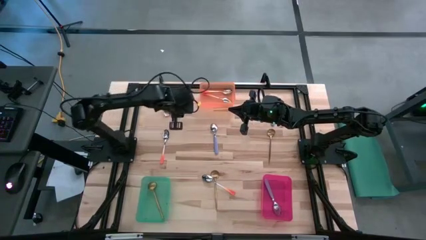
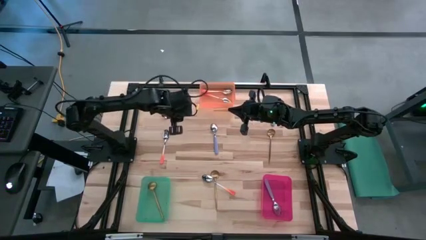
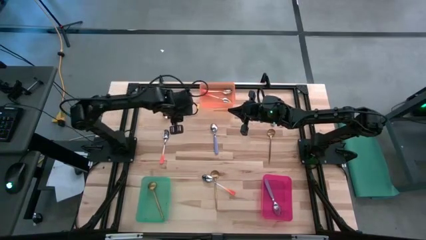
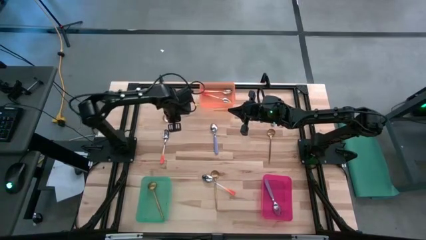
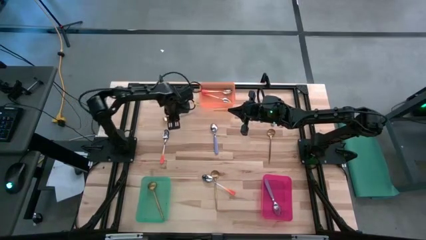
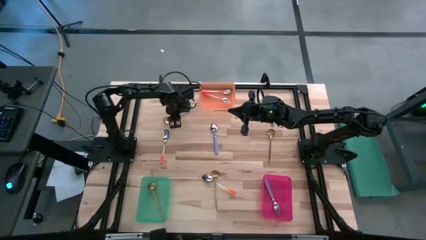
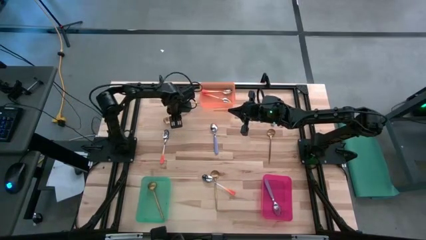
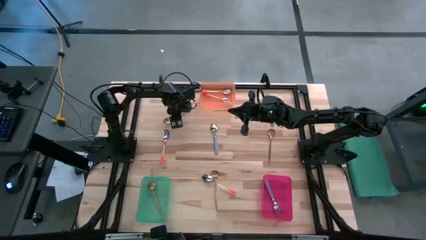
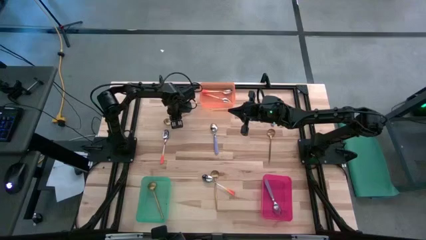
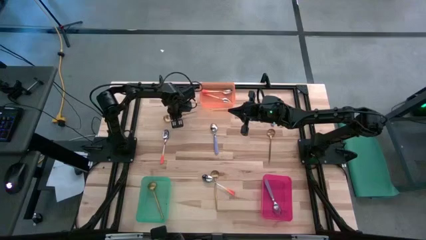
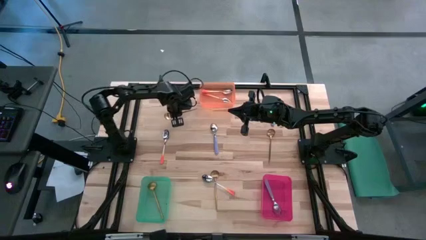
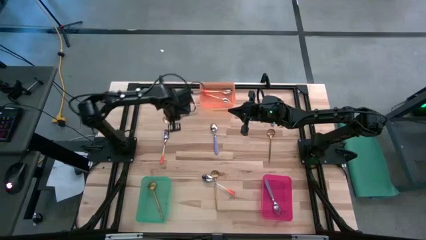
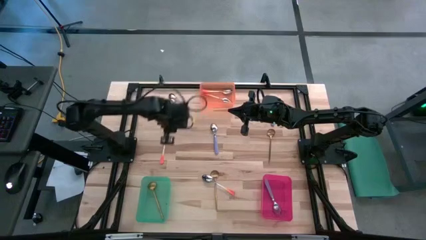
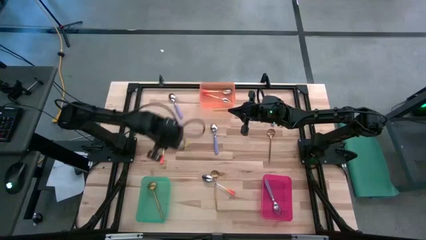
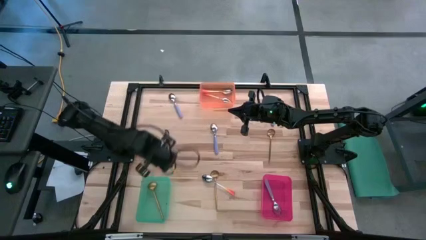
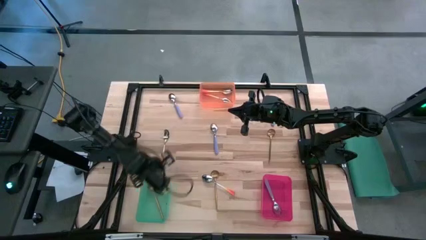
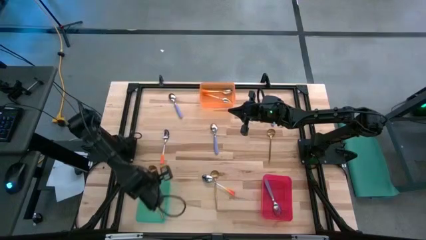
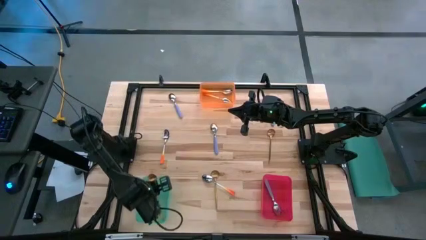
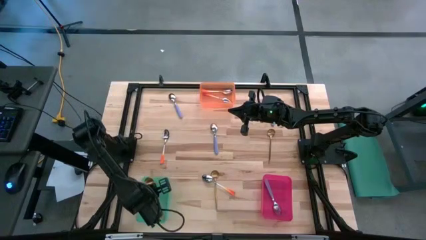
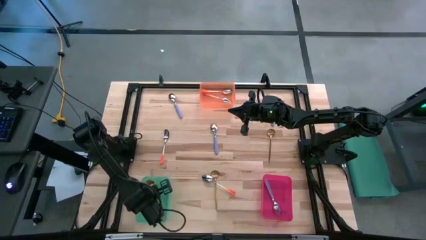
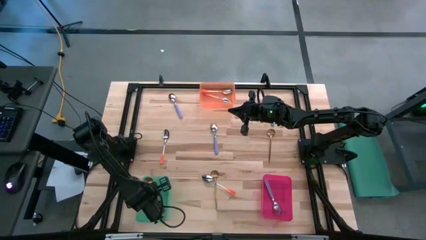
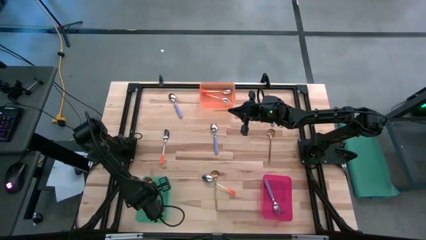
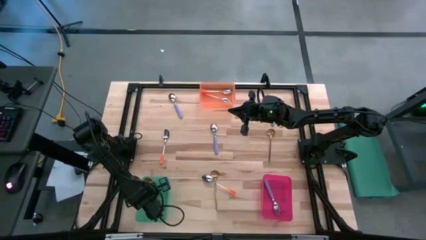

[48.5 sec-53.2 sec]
Task: Sort silverware by color (type)
Put the golden spoon into the green bin

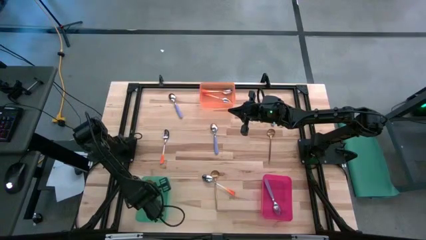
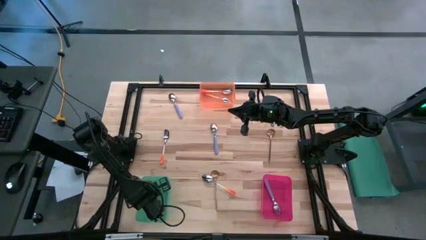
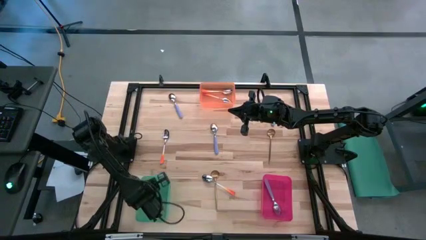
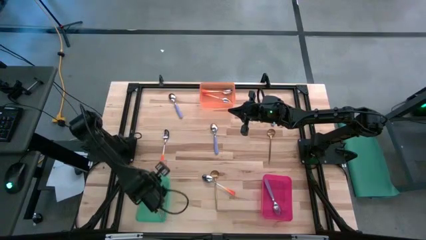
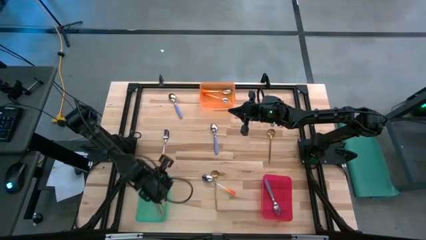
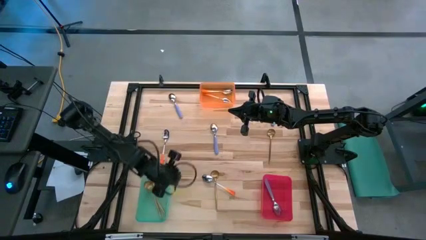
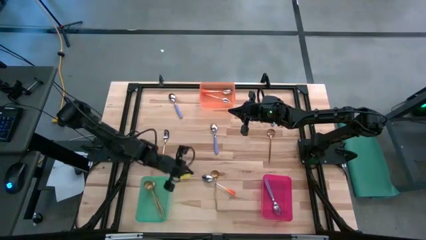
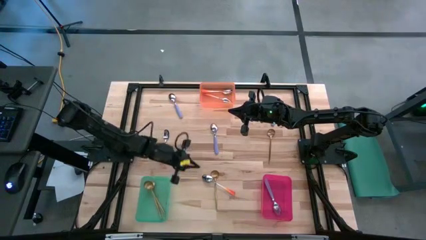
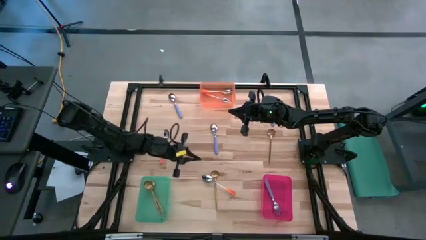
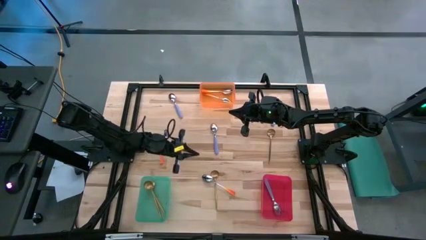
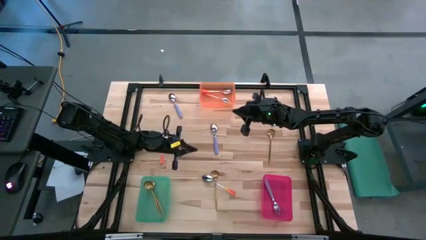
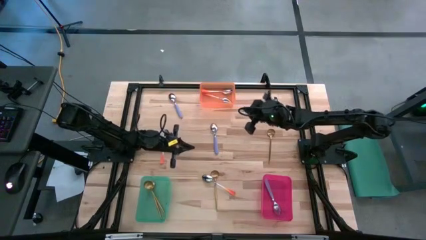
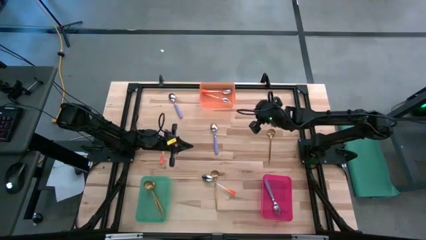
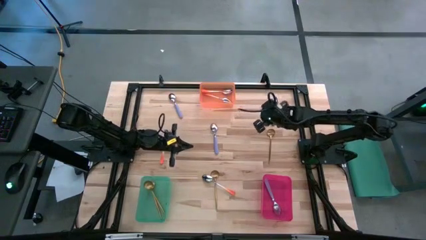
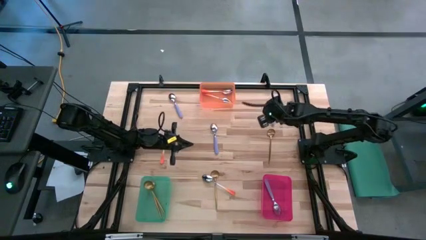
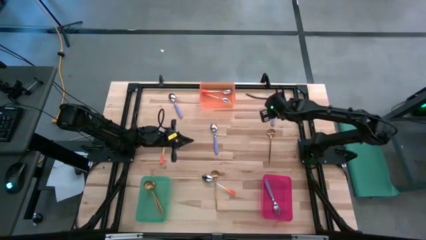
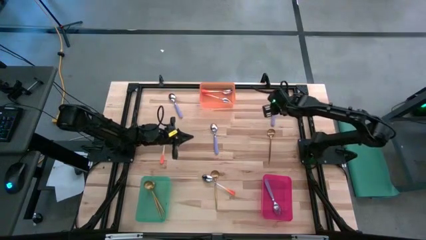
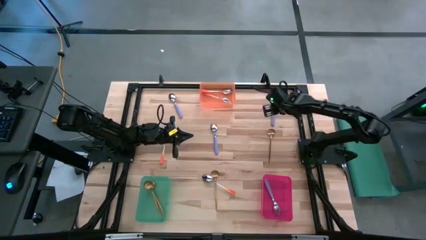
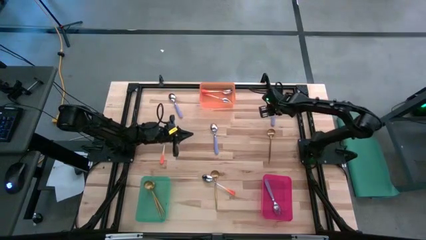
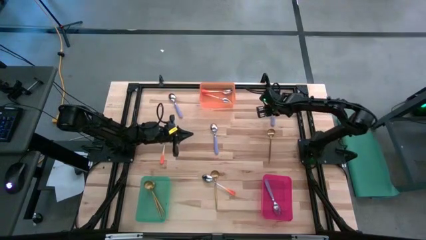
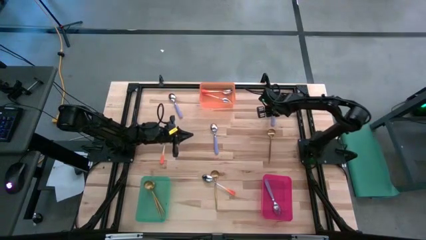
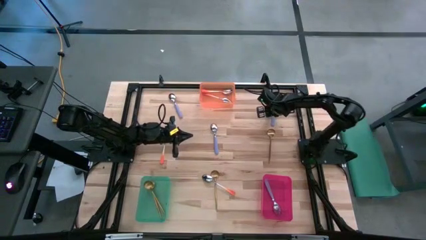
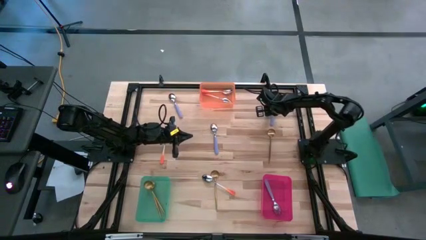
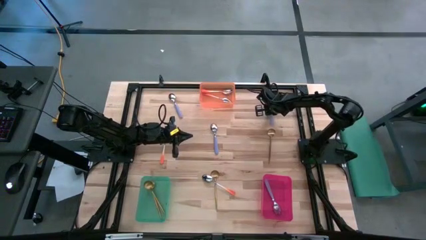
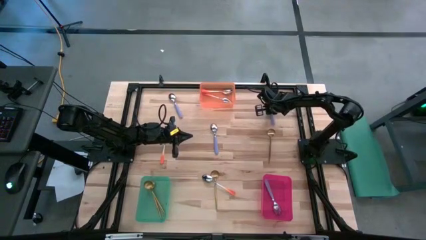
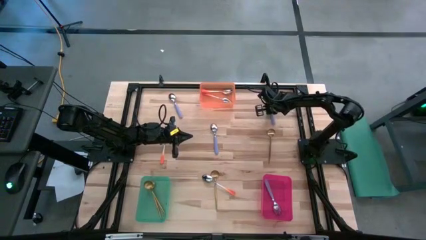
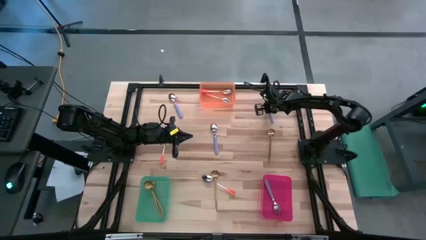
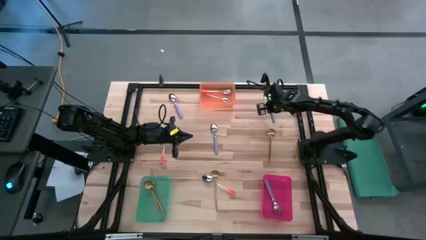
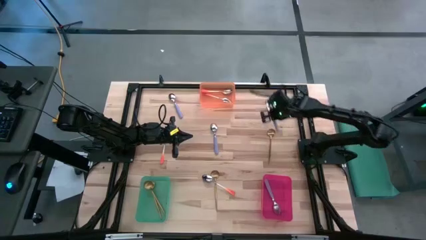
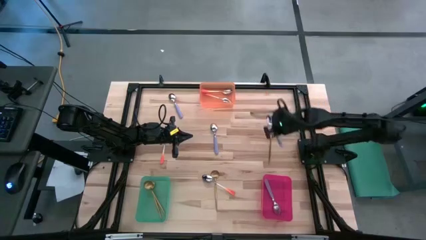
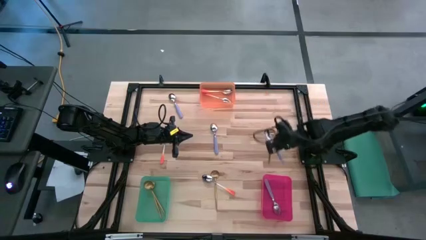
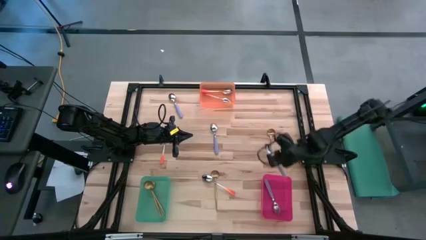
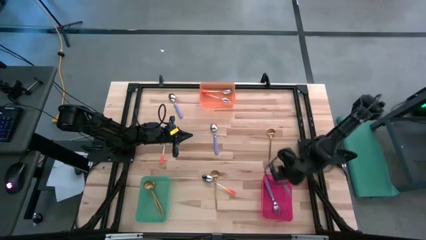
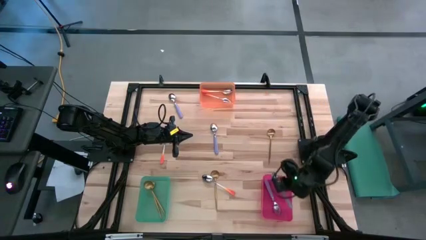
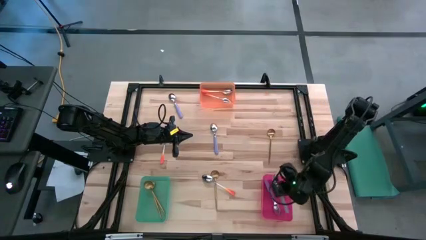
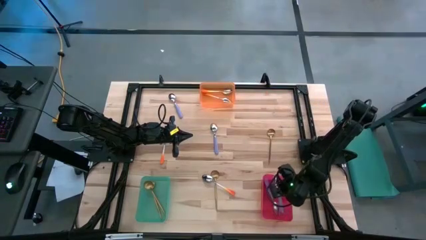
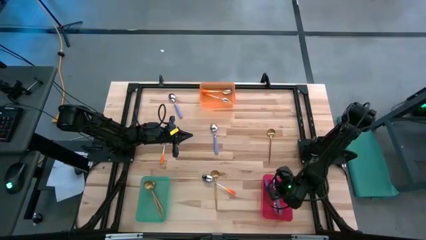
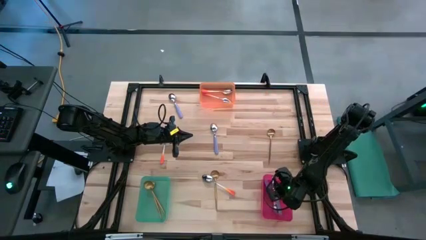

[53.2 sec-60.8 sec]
Put the violet spoon into the red bin

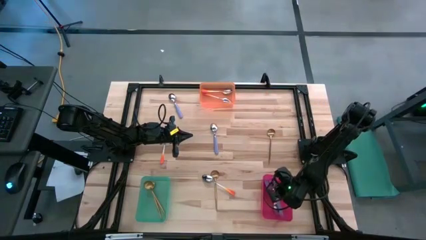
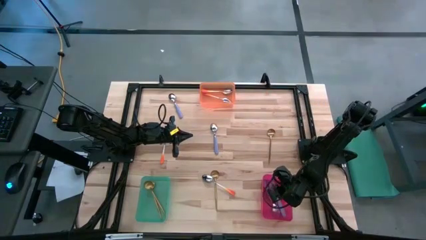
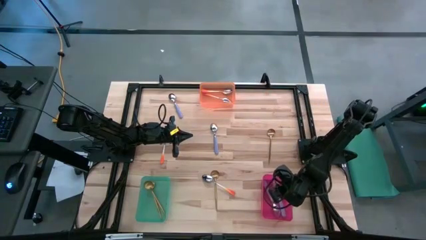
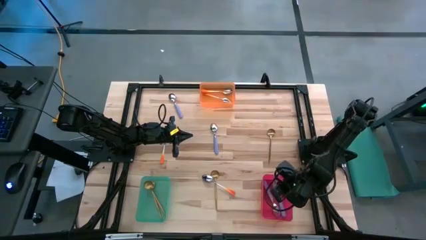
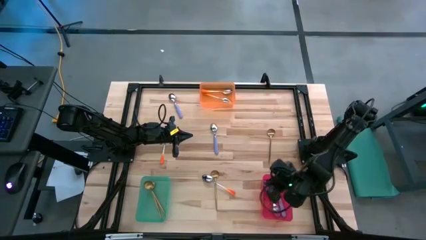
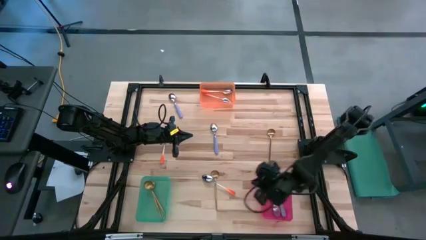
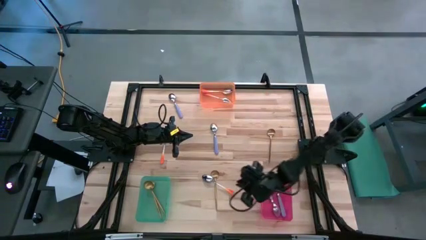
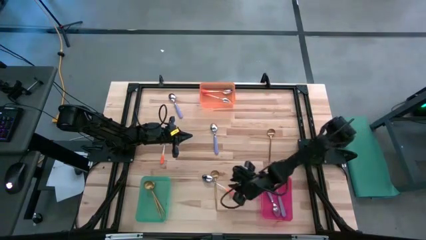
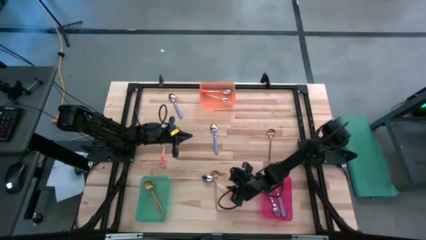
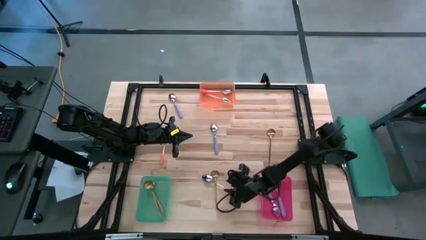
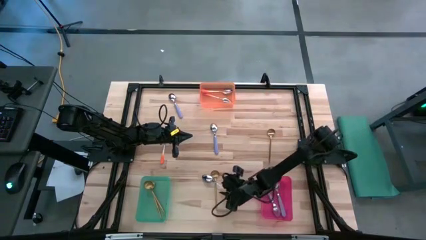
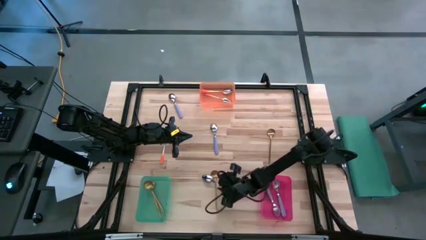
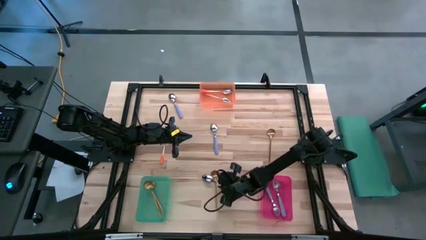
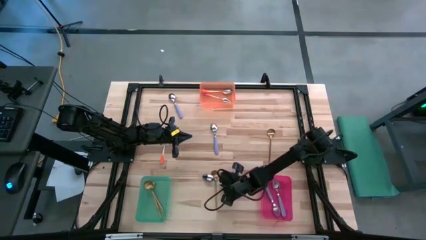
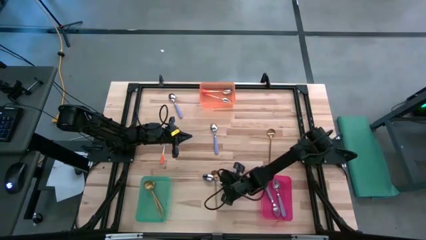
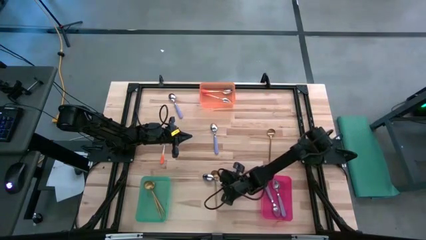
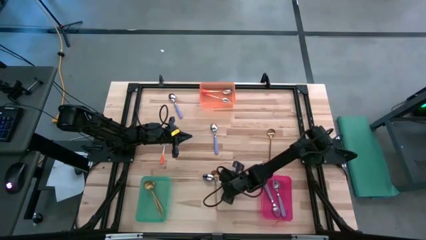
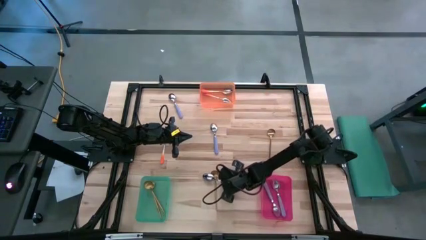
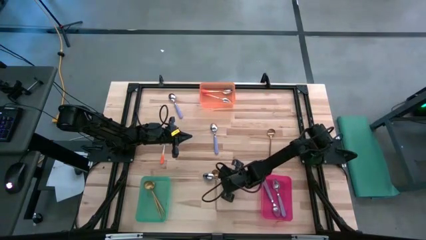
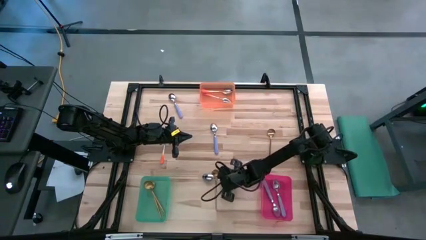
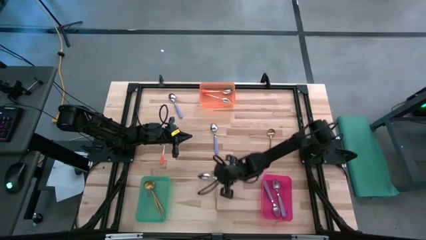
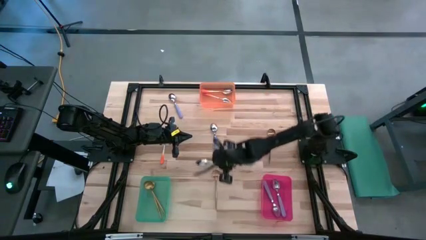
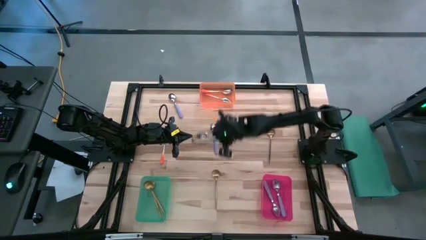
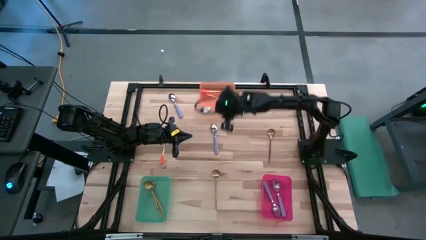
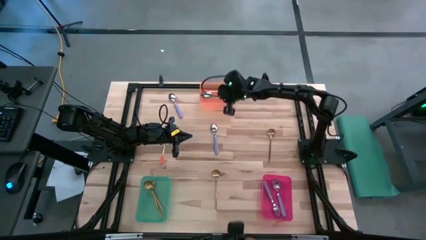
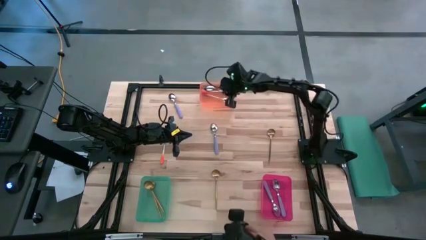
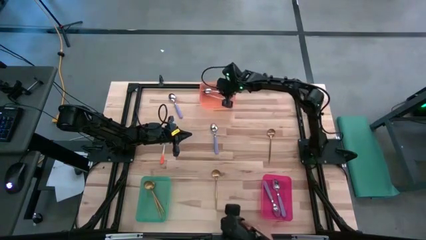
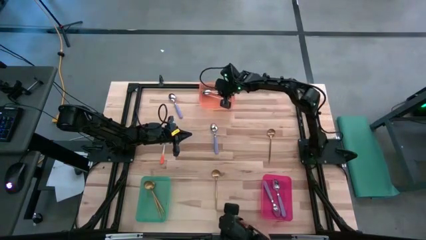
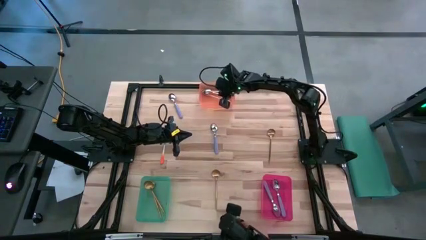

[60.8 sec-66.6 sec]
Put the orange spoon into the orange bin
